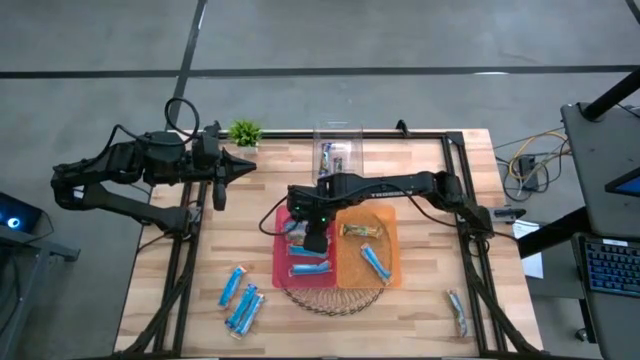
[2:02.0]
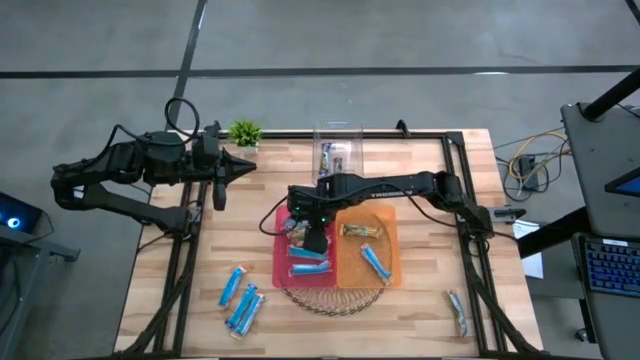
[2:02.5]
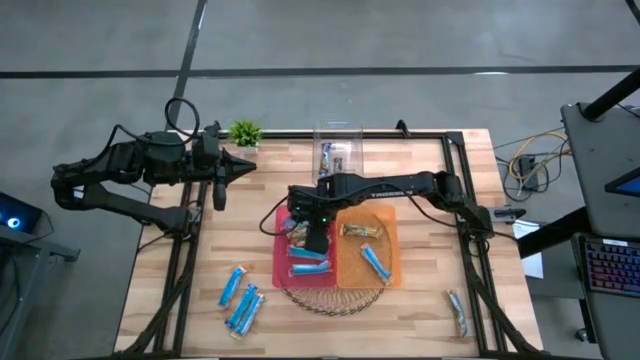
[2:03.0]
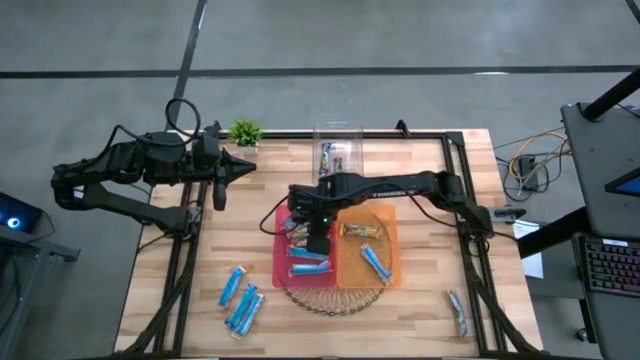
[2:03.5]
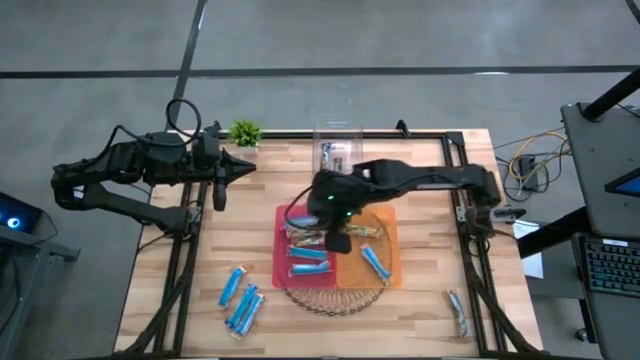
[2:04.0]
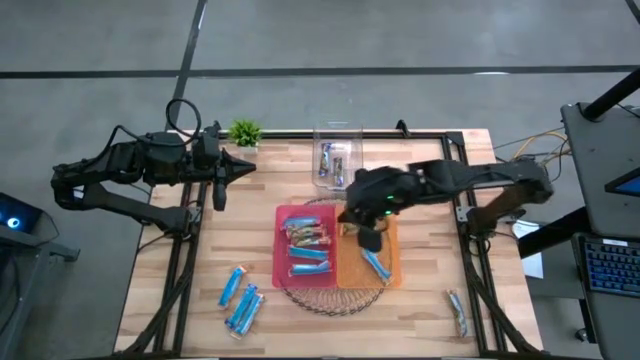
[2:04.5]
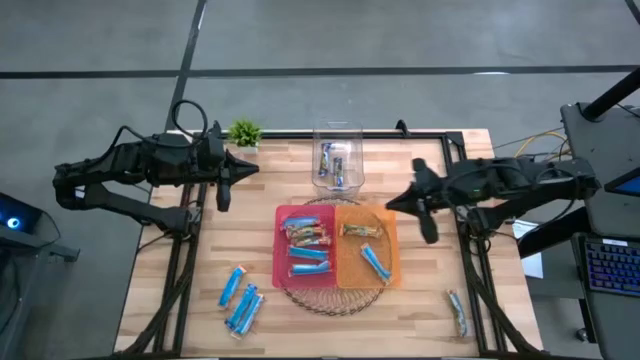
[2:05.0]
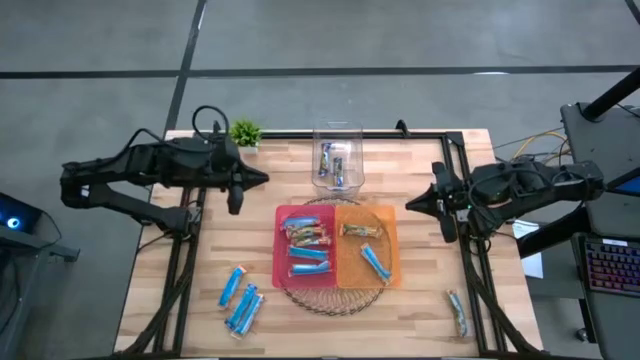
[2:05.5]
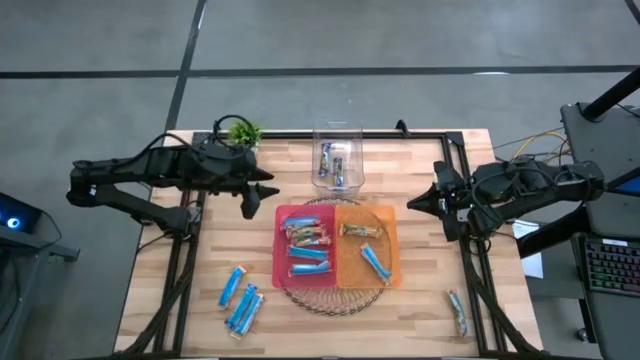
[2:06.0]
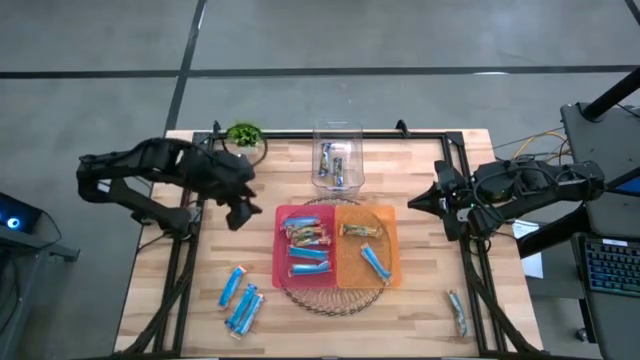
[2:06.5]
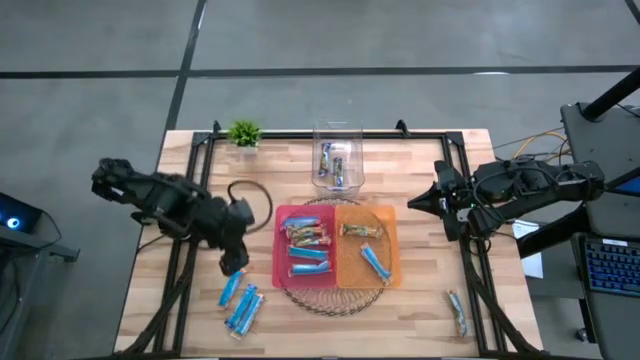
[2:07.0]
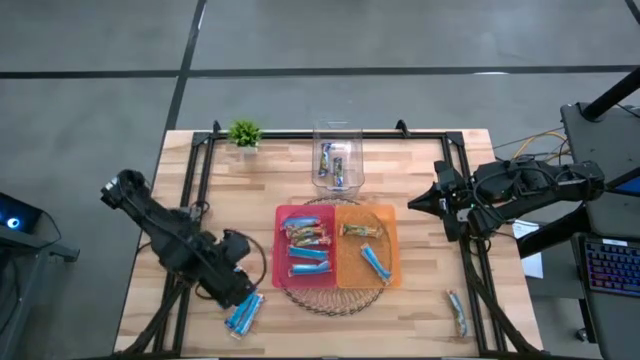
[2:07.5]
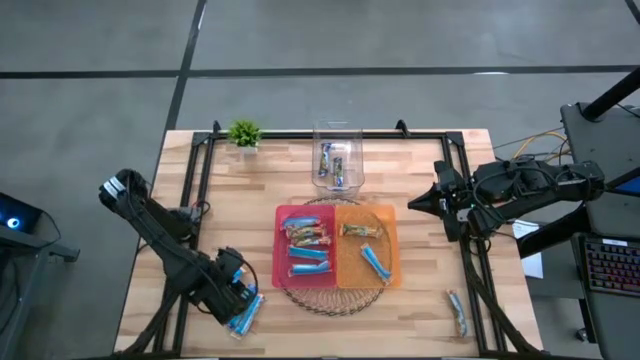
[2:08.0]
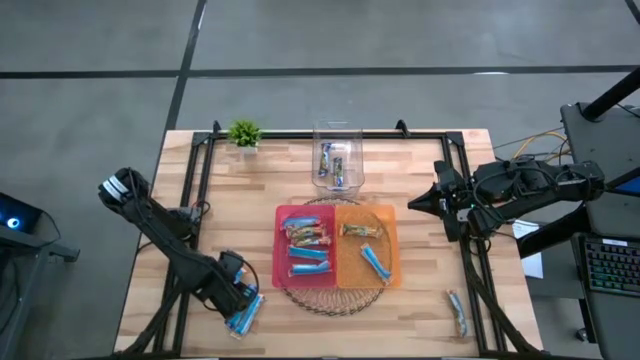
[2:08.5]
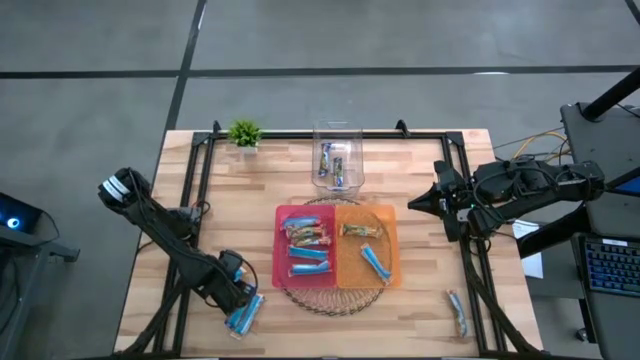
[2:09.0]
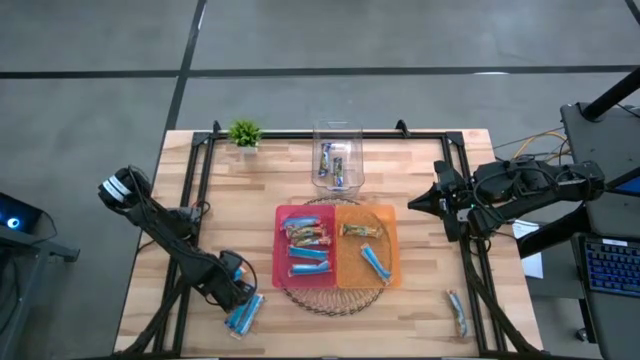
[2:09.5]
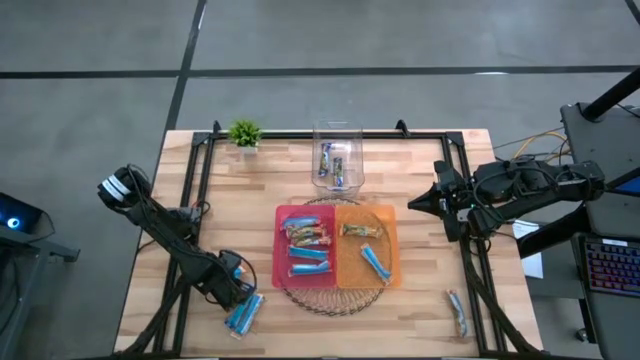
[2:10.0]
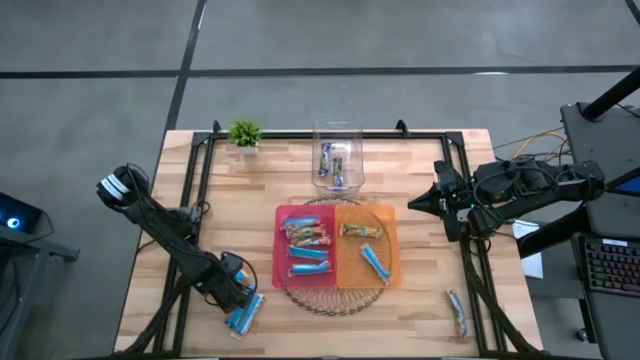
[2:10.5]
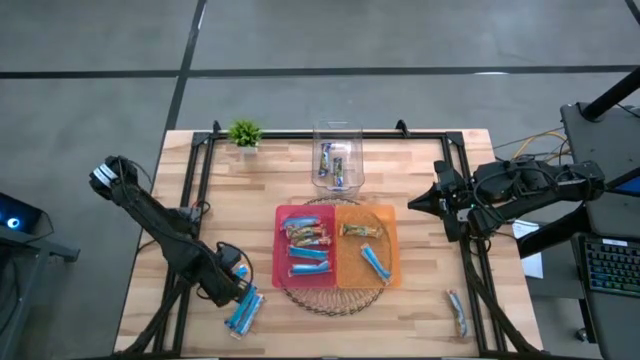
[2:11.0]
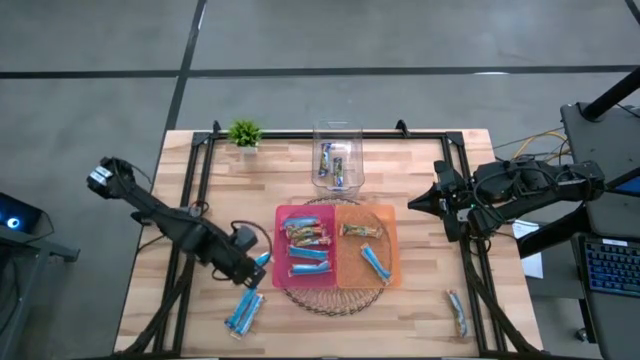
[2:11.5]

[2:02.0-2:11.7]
Task: Pick and place Granola Bars by type
Put the yellow granola bar into the orange bin

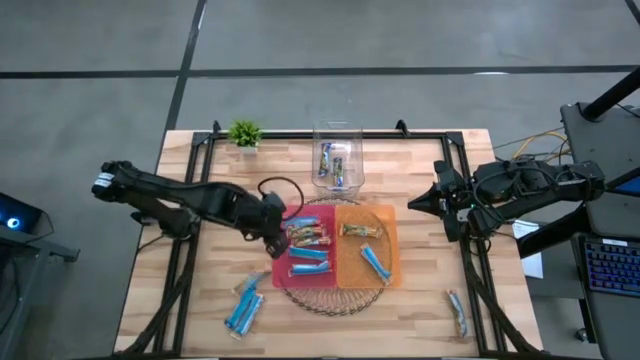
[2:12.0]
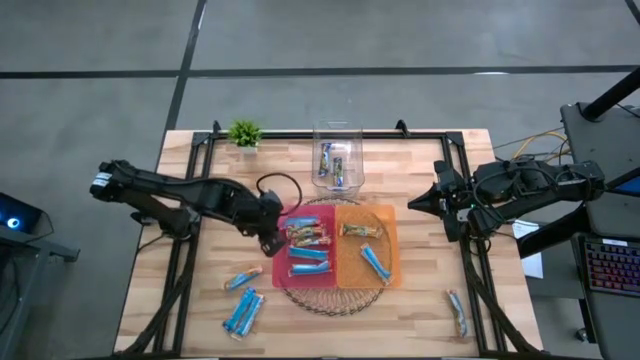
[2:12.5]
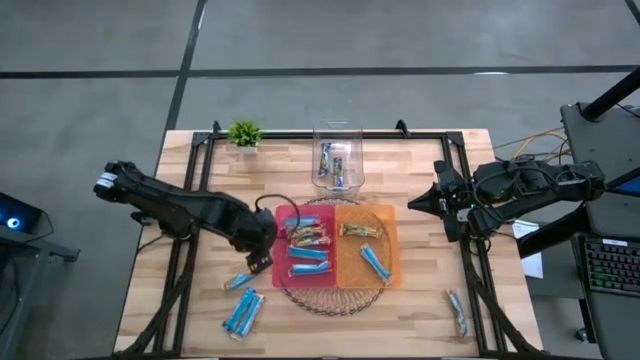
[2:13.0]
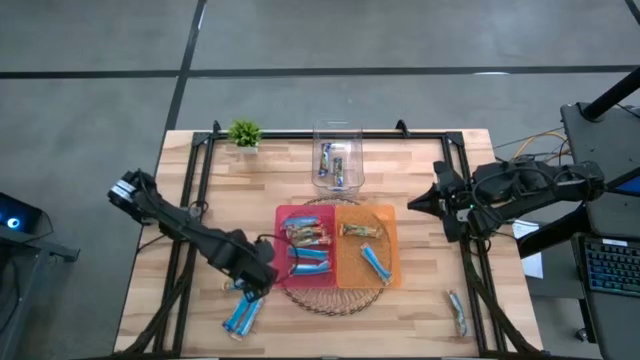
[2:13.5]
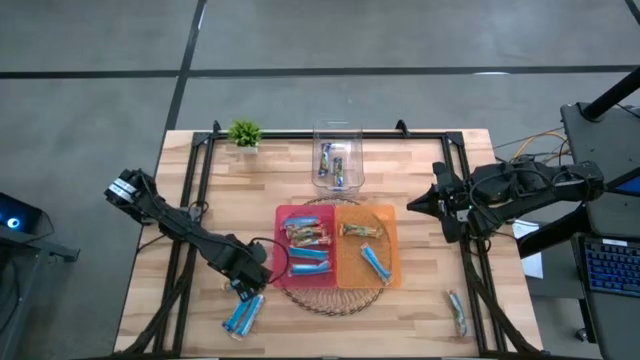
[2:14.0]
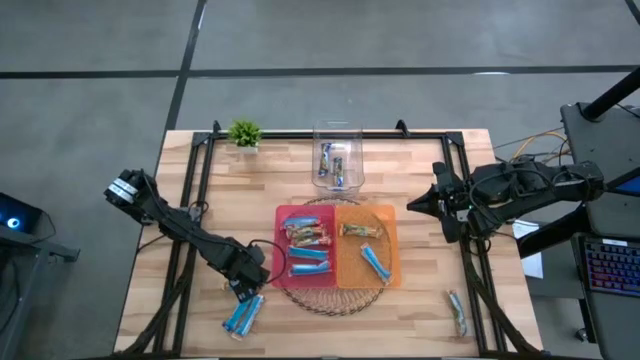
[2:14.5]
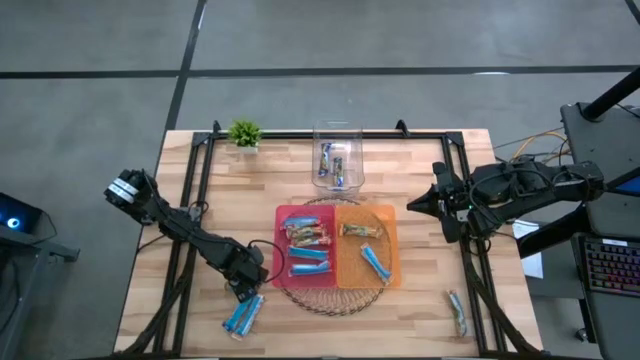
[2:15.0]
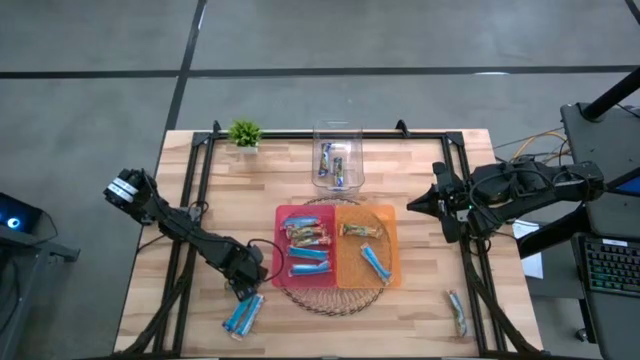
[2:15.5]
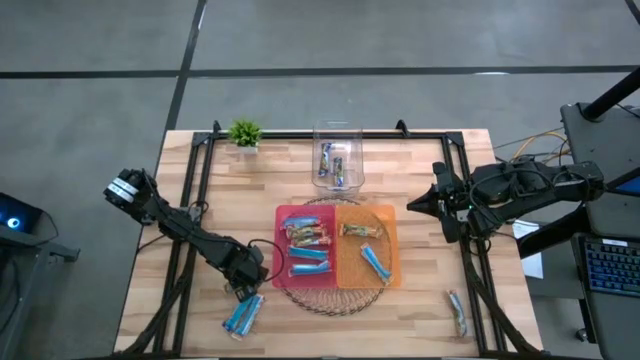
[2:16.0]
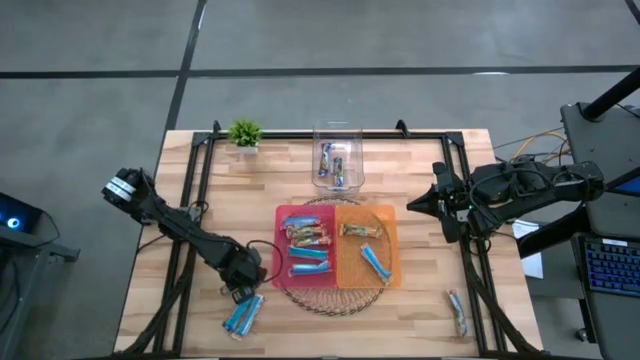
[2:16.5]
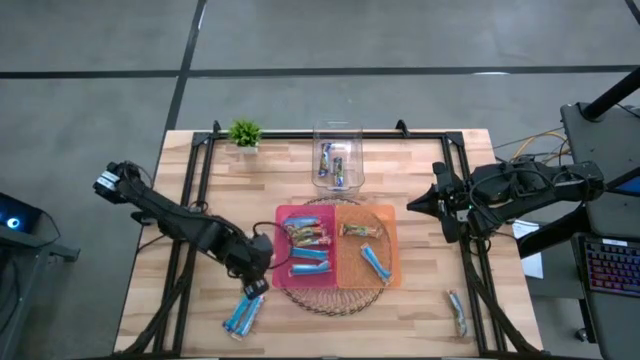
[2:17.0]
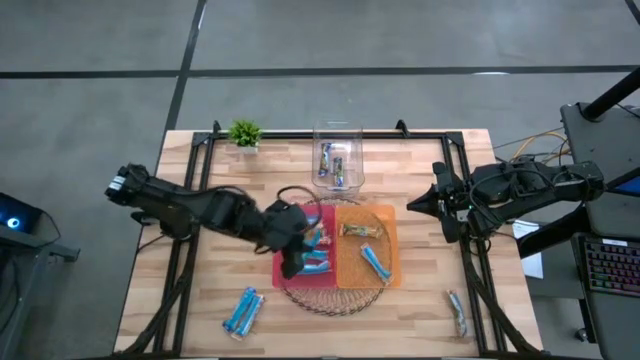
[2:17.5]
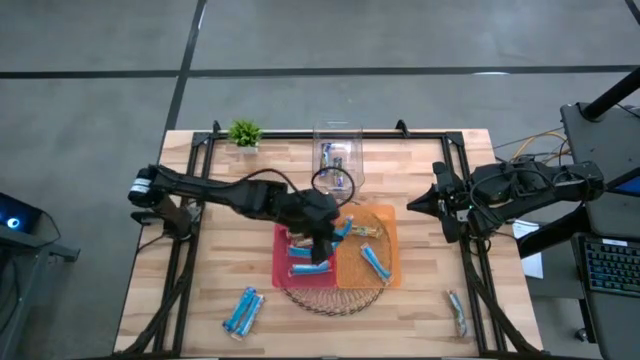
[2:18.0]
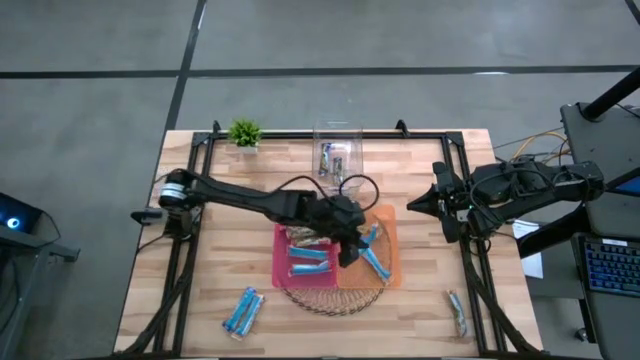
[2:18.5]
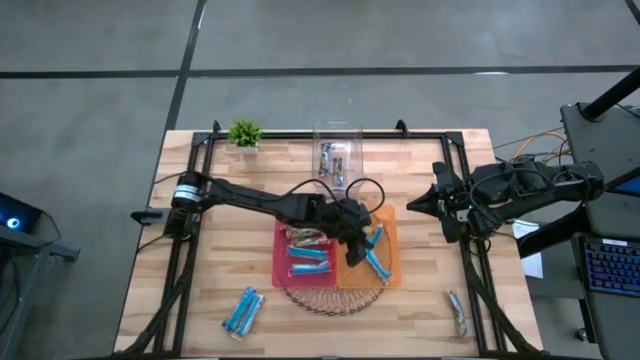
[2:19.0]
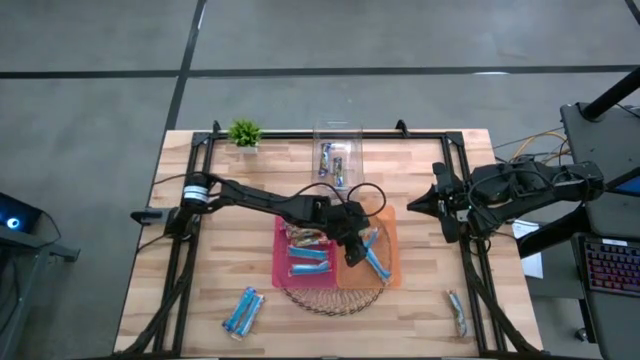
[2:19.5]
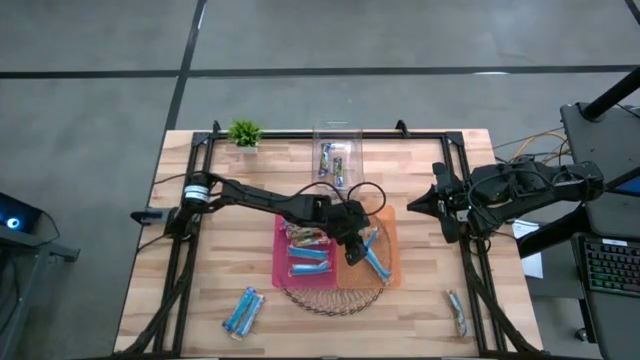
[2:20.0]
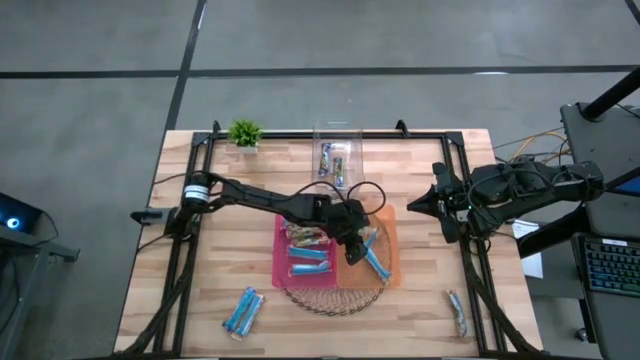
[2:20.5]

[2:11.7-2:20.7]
Put the yellow granola bar into the orange bin

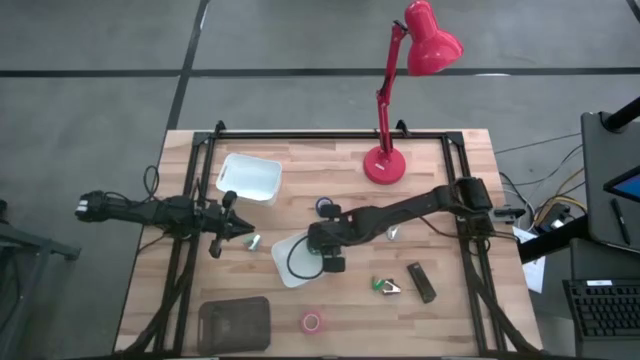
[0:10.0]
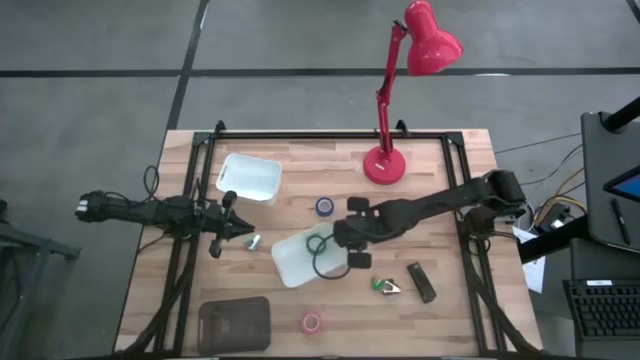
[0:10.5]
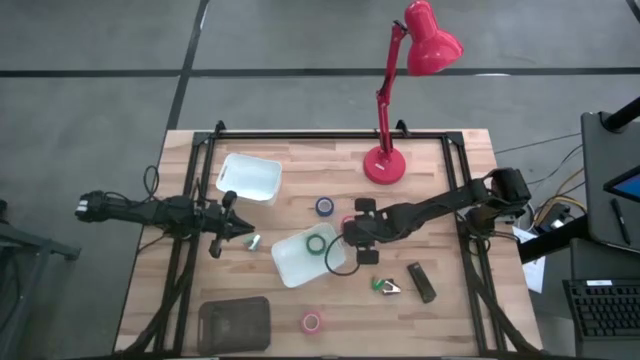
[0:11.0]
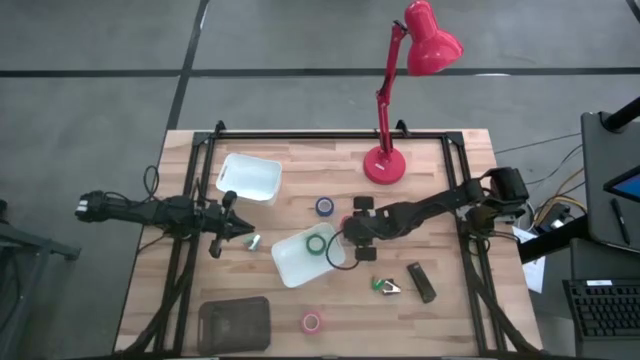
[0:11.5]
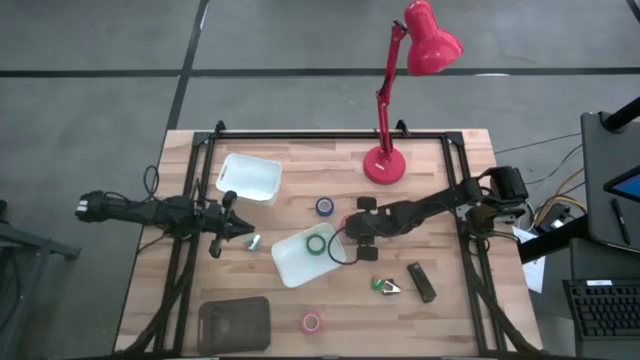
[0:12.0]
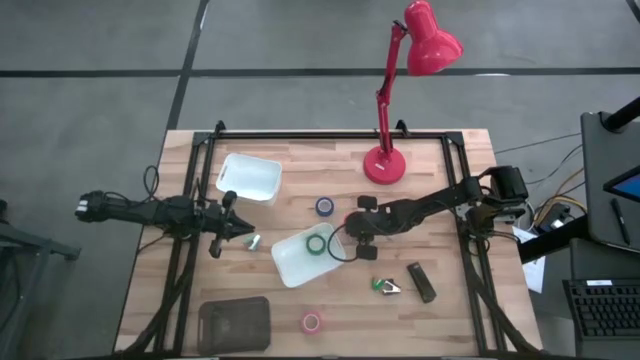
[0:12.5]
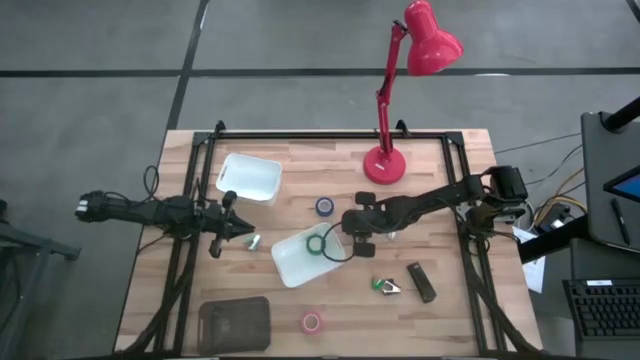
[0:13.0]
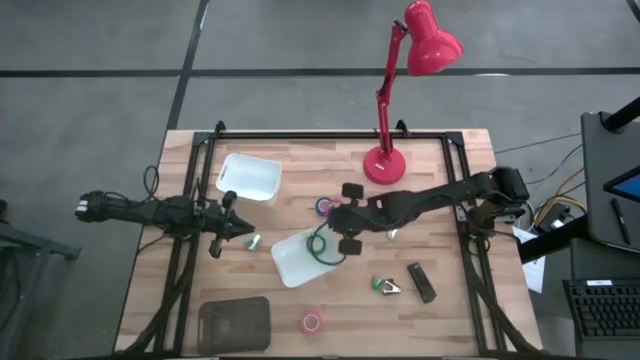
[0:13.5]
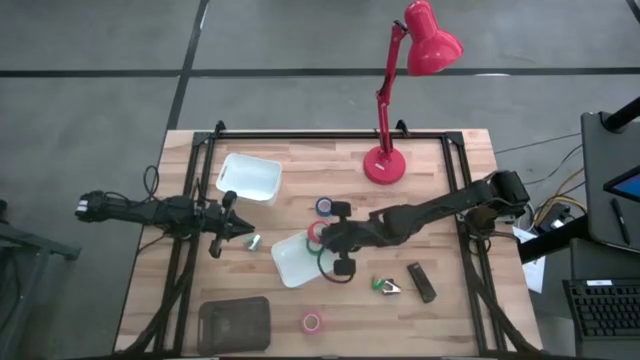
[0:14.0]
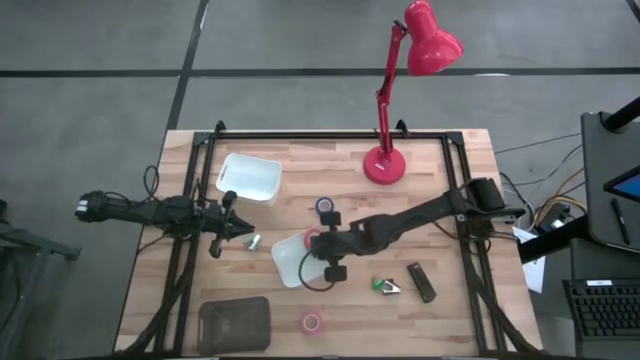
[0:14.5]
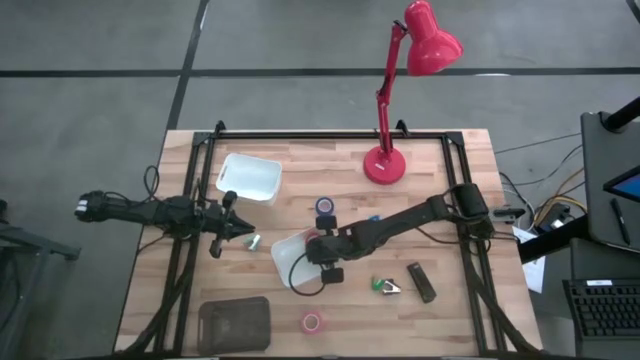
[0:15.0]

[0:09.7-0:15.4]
Task: Pick and place Stapler, Stapler remover, tape
Put the orange tape into the bottom white bin
